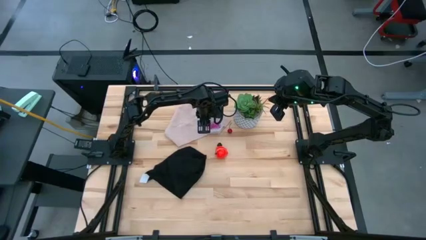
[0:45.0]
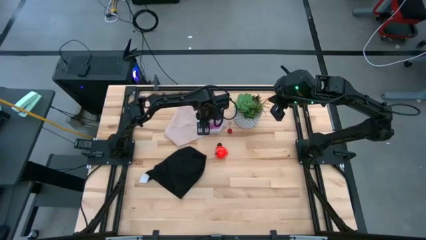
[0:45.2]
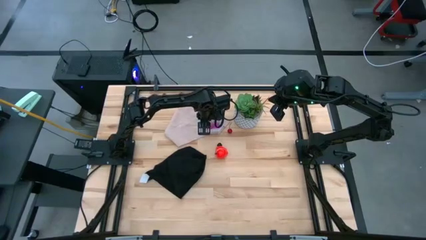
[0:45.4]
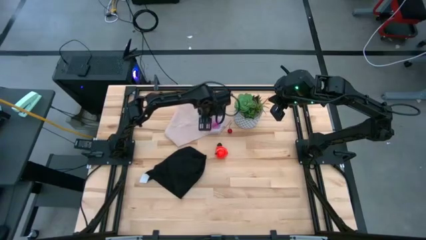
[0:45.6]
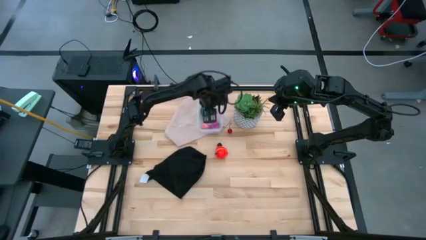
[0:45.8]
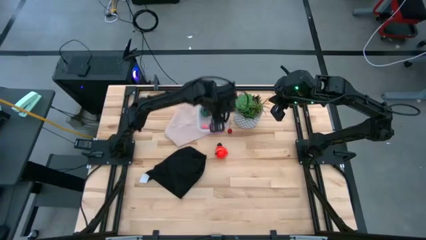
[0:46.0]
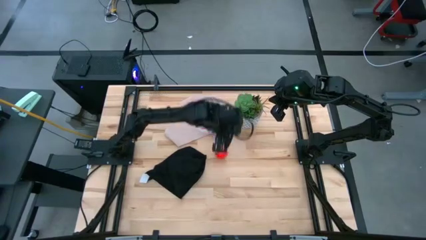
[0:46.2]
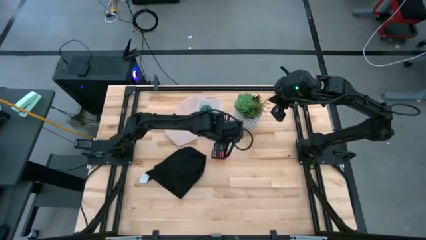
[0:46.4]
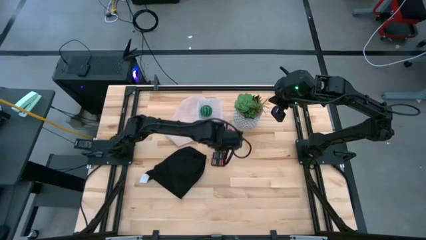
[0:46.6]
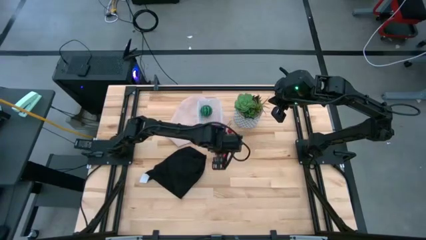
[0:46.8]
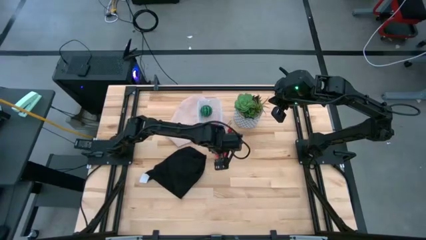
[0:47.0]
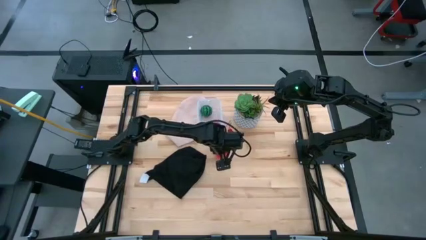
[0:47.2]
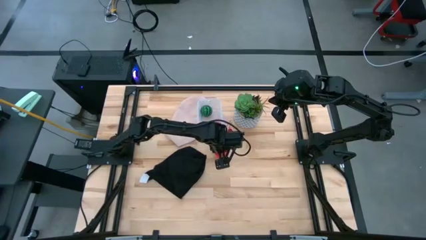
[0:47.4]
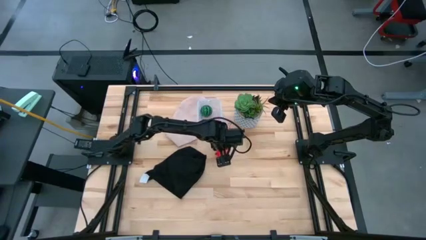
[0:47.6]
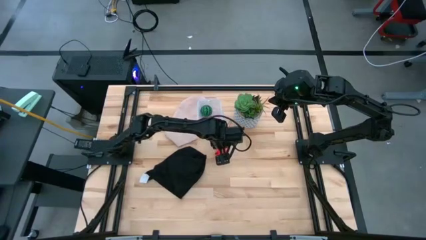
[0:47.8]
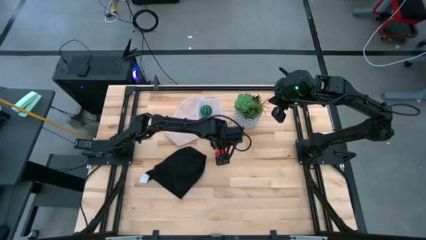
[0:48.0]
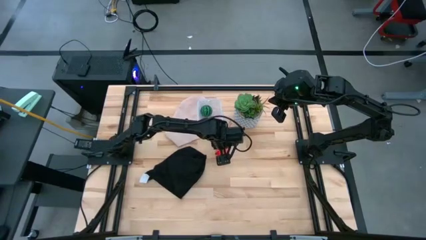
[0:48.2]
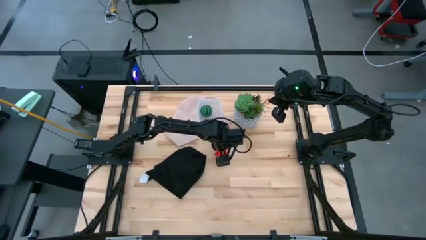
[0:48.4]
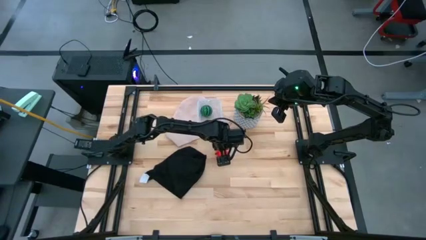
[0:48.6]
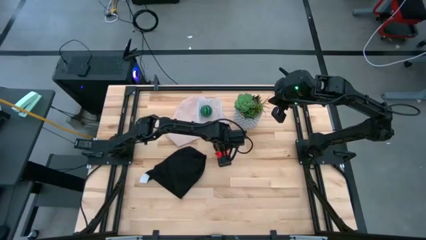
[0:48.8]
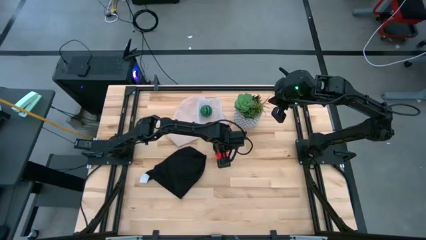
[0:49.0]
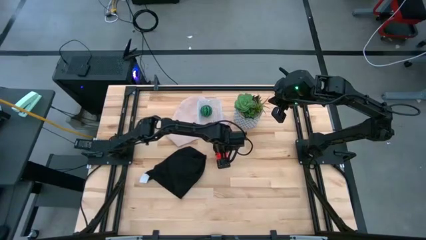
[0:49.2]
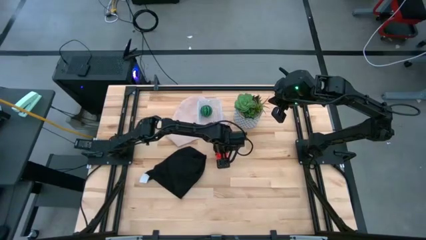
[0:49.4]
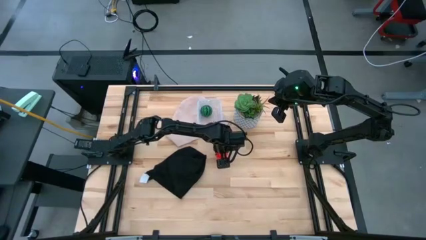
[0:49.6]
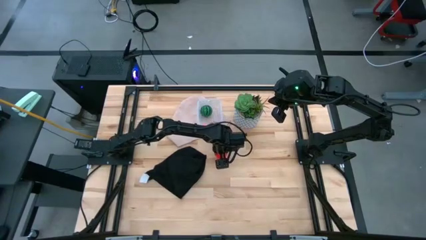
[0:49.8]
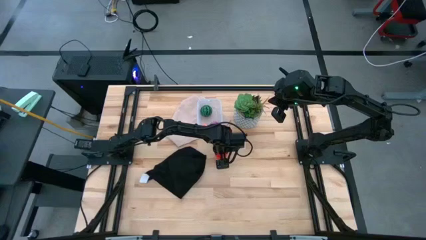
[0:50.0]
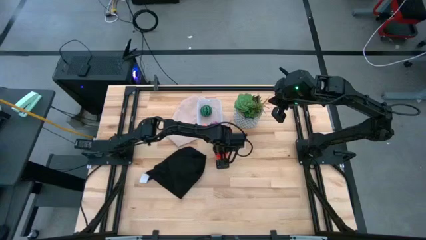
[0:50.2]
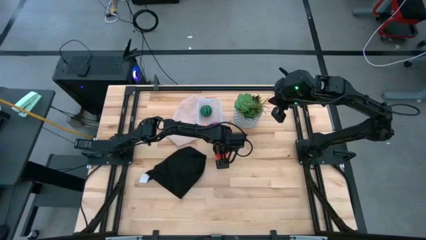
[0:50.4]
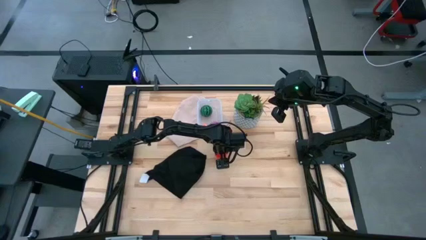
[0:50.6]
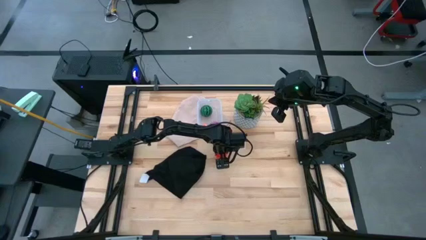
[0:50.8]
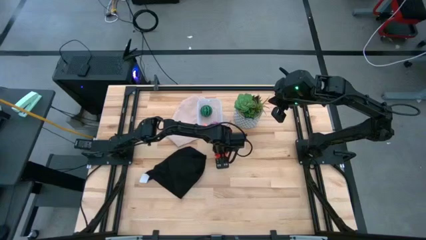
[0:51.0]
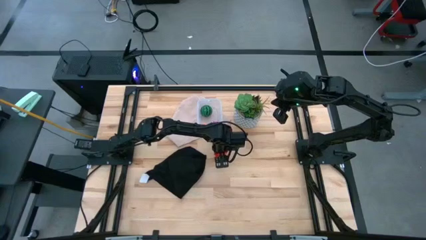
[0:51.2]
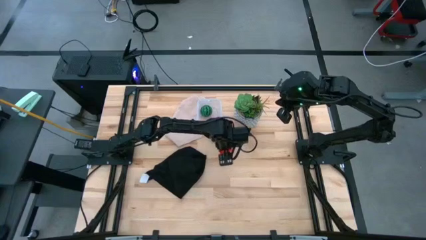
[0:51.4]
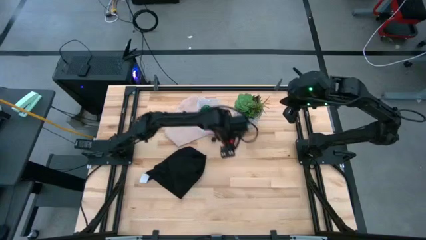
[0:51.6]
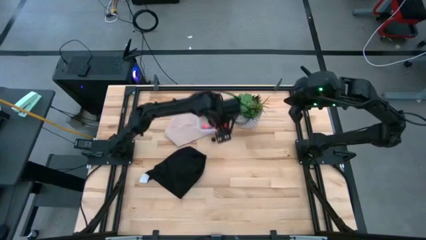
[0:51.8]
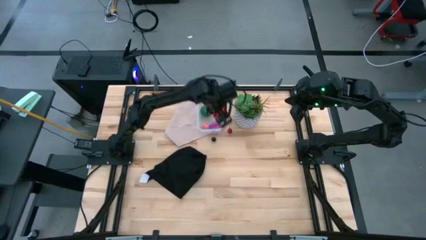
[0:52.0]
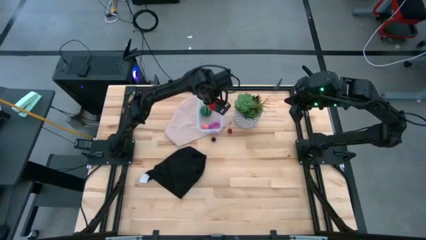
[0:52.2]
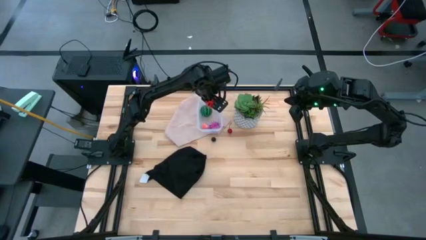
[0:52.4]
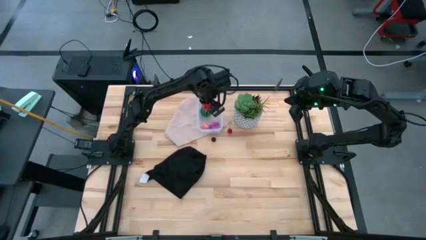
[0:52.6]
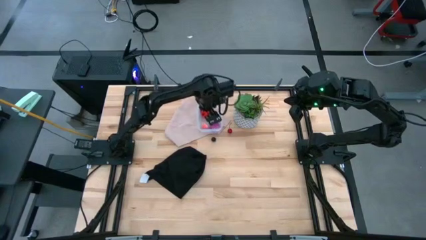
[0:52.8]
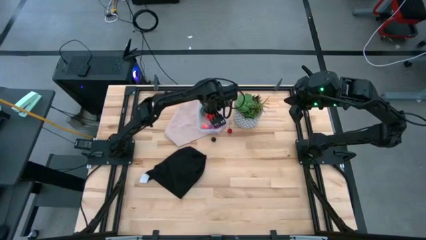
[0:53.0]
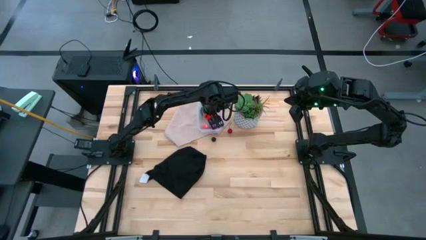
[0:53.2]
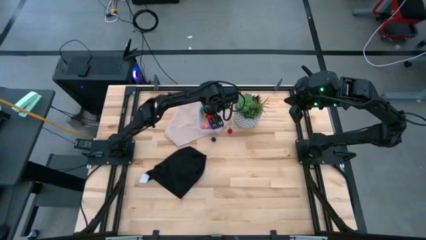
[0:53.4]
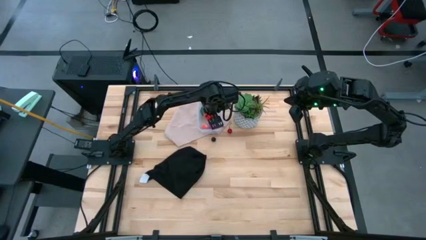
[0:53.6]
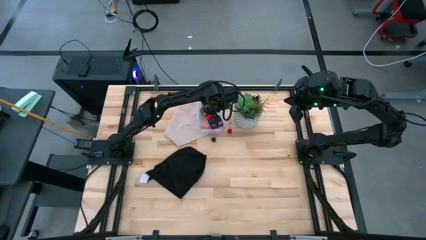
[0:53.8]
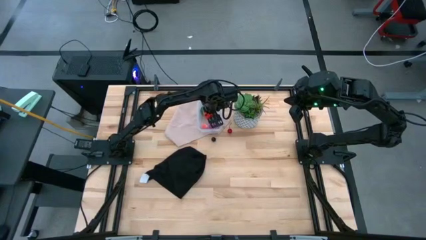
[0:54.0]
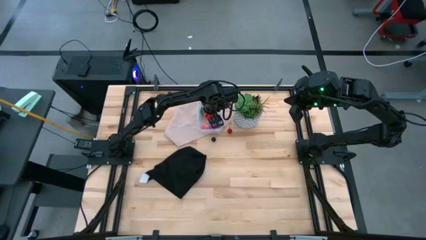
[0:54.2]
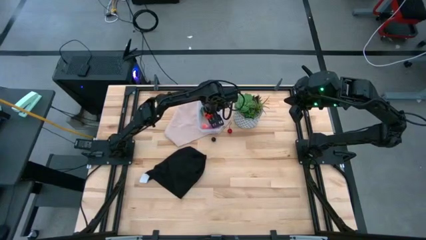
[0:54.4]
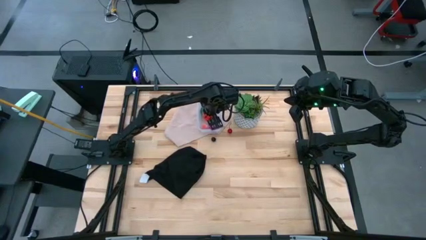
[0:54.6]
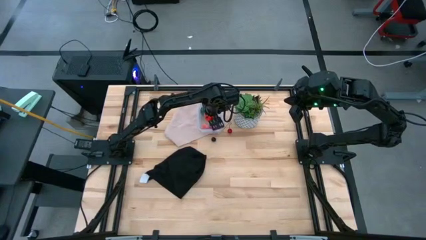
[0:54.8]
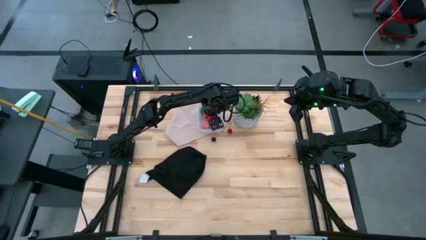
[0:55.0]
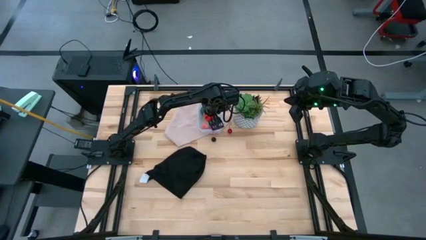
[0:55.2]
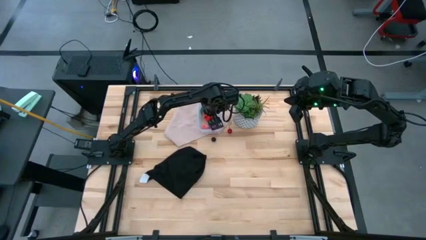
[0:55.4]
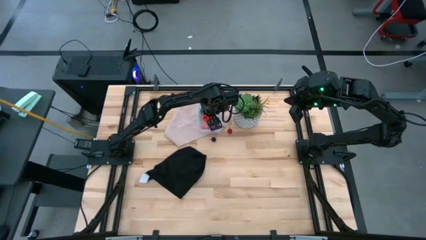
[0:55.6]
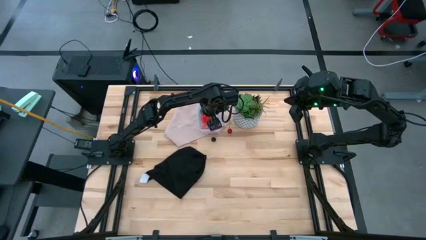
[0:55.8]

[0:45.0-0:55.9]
Task: Pick and placing Produce into tupperware
Put the apple into the transparent bin

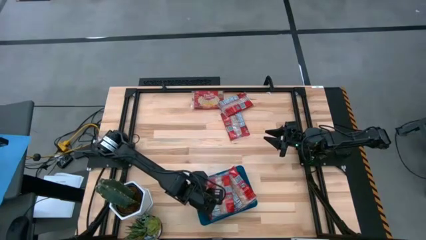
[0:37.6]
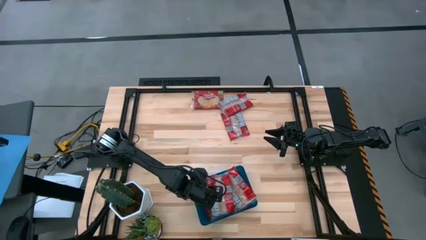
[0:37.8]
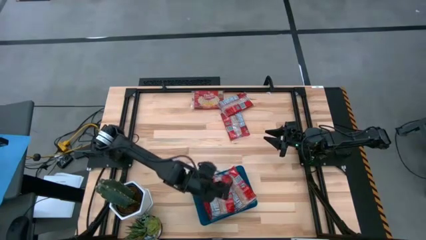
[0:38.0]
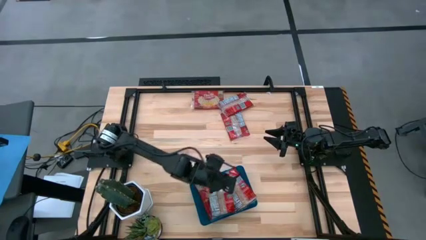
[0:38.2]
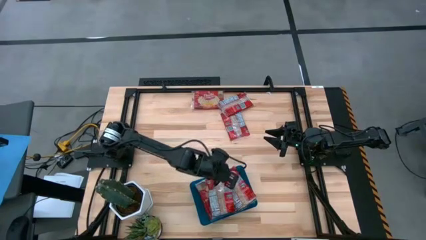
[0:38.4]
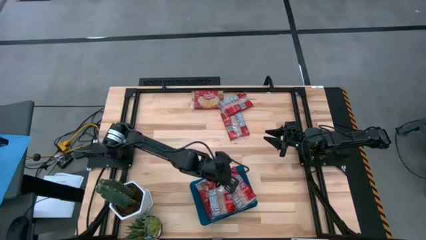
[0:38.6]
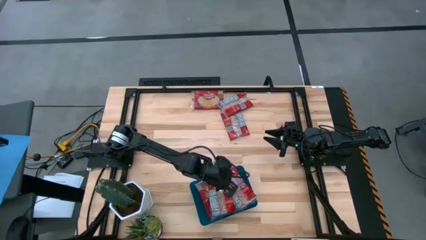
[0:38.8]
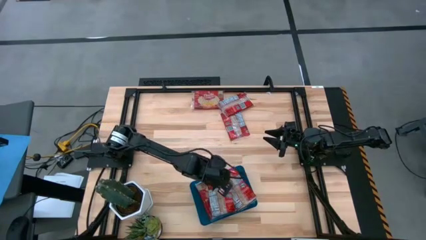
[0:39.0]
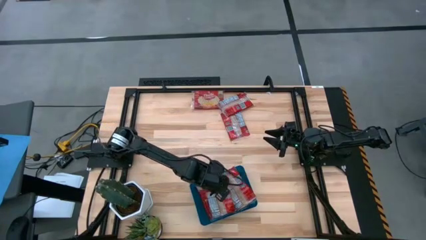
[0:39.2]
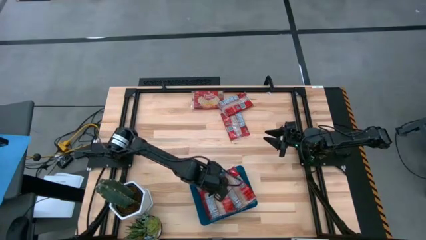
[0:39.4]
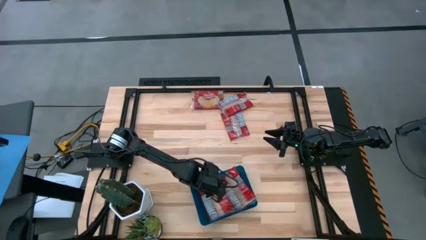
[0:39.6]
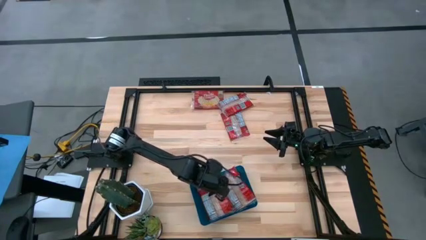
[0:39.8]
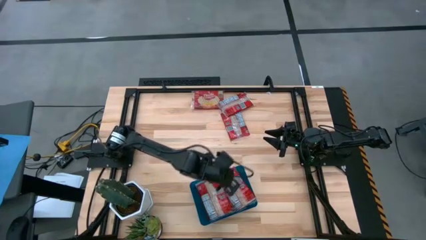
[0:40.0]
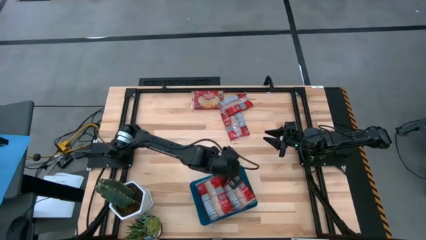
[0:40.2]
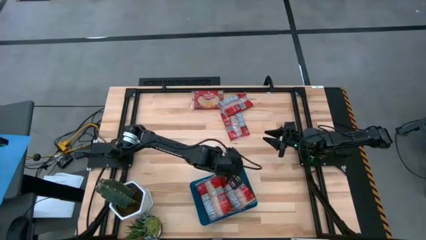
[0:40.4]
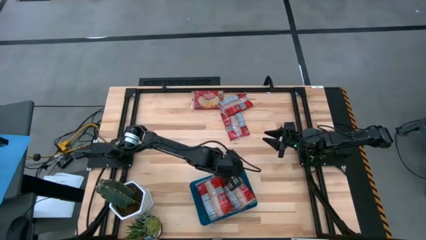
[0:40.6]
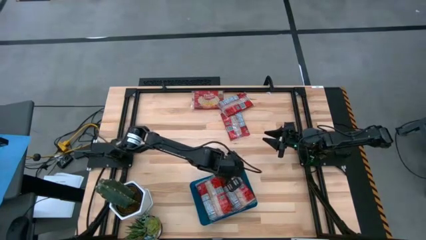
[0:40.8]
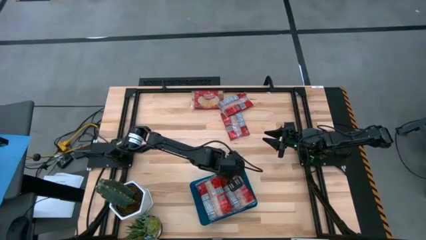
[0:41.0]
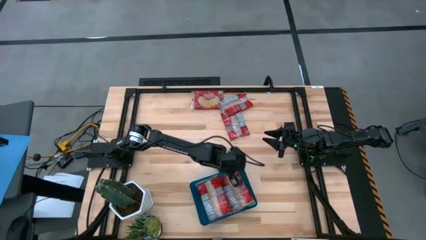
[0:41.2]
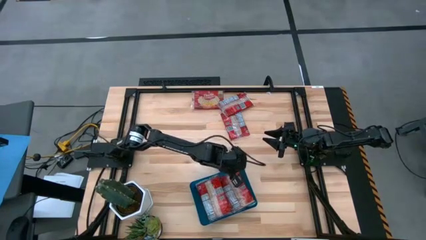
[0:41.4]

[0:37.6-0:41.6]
Task: Sort popcorn bags into baskets
Adjust the popcorn bags on the blue bin
